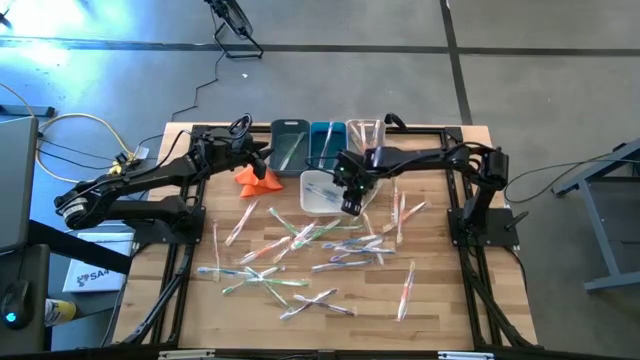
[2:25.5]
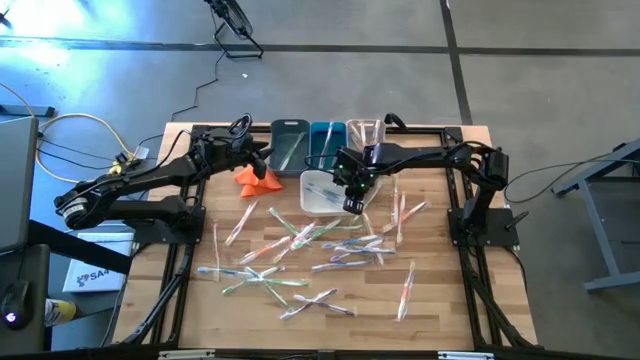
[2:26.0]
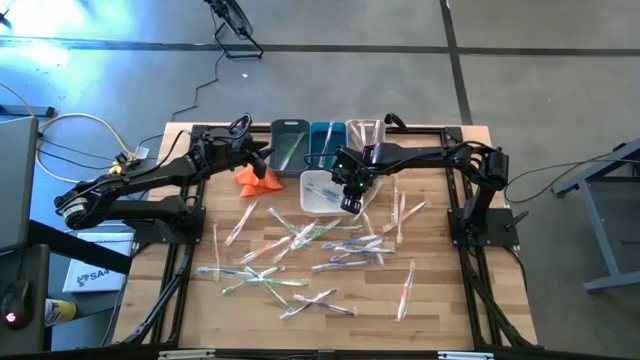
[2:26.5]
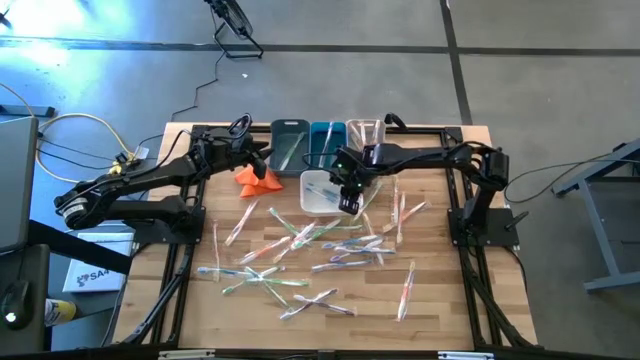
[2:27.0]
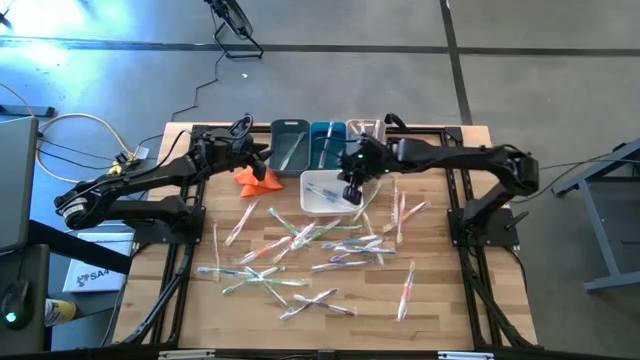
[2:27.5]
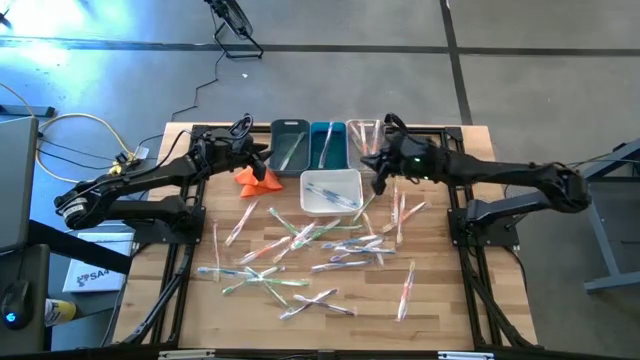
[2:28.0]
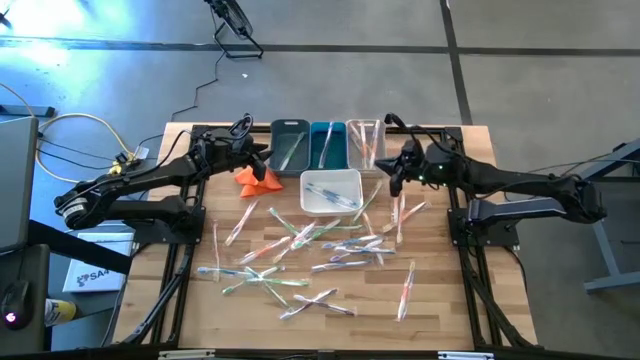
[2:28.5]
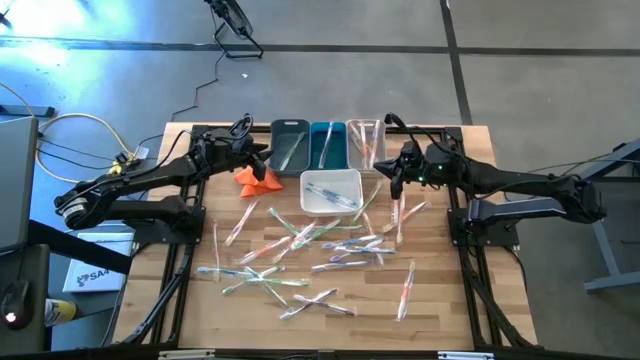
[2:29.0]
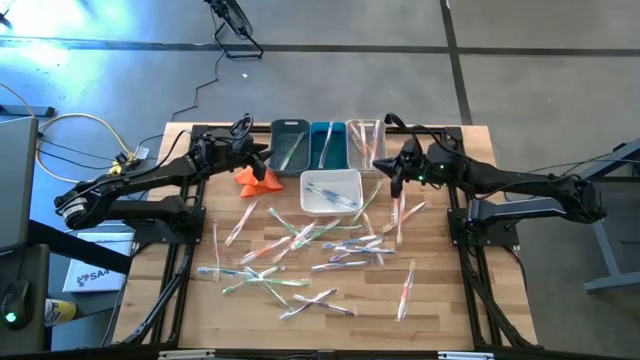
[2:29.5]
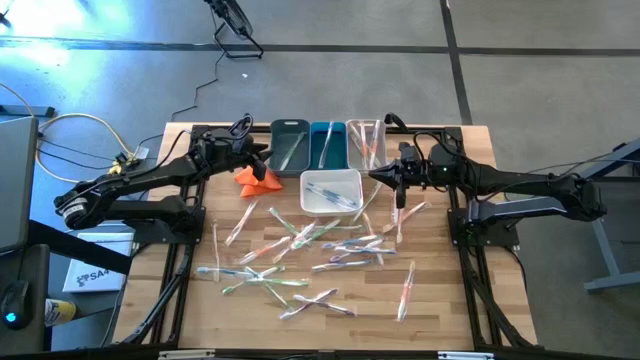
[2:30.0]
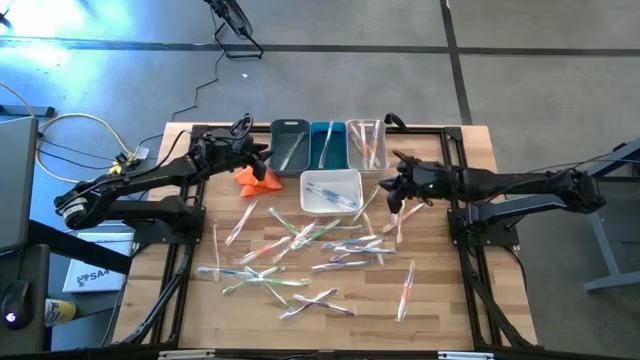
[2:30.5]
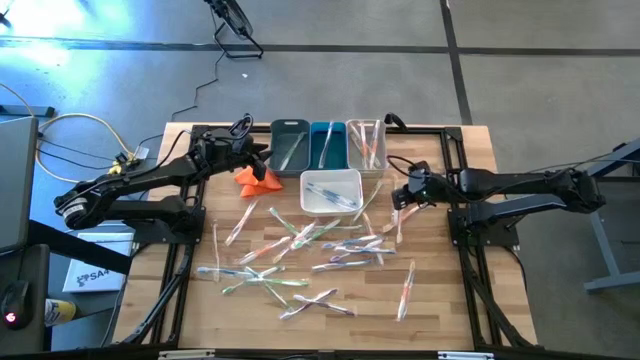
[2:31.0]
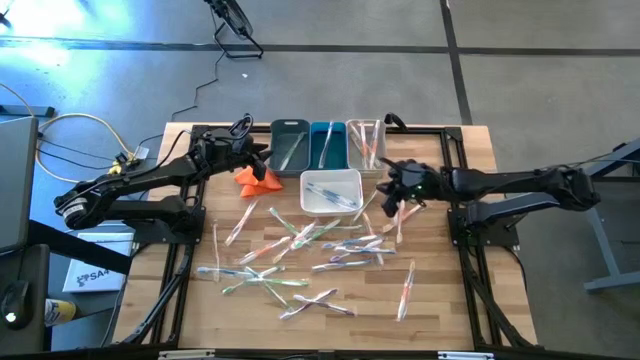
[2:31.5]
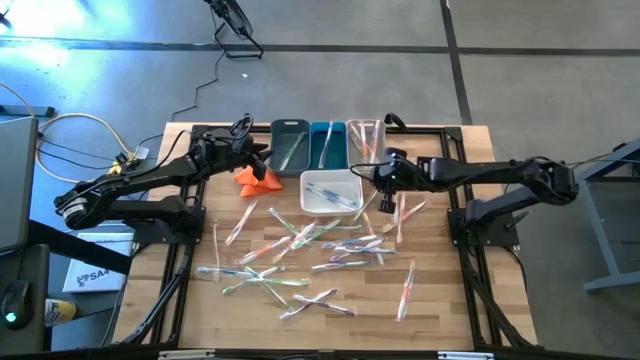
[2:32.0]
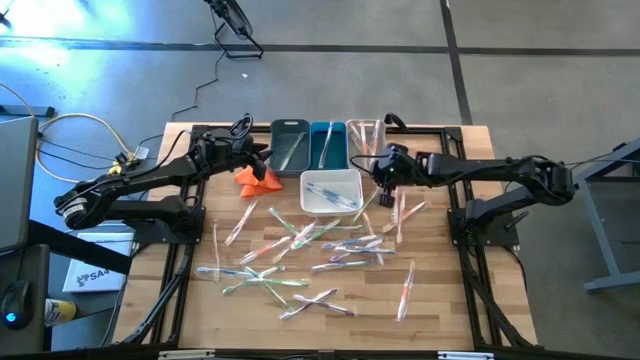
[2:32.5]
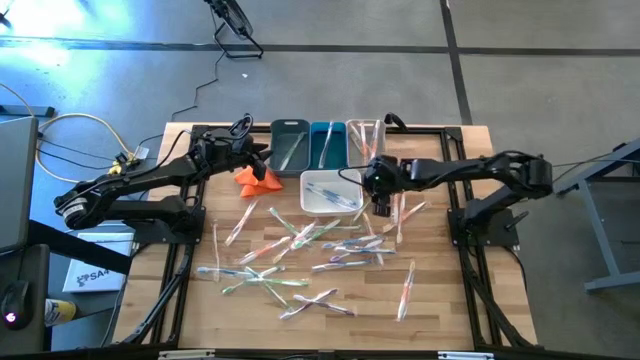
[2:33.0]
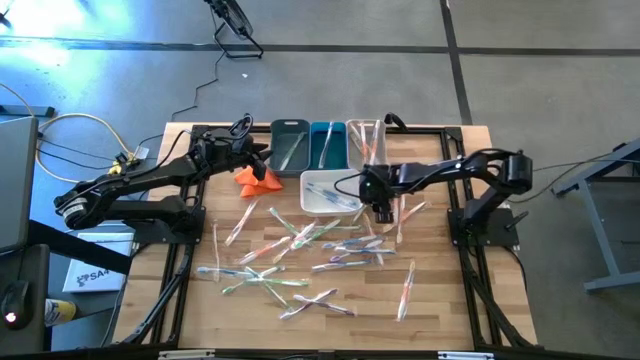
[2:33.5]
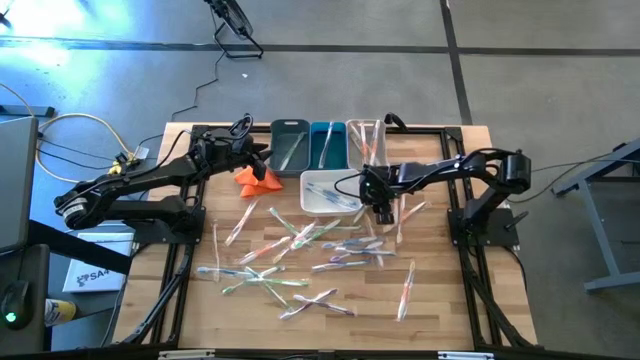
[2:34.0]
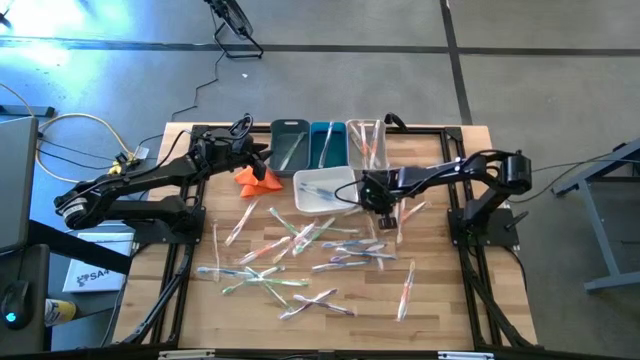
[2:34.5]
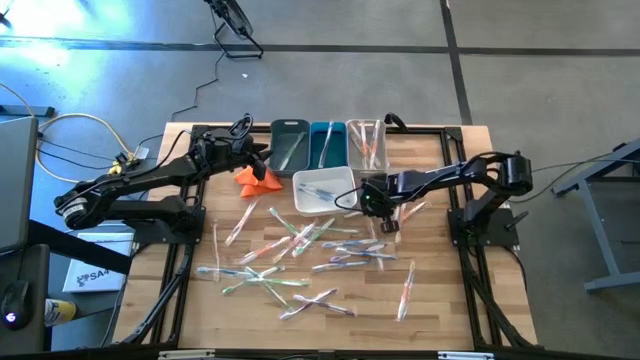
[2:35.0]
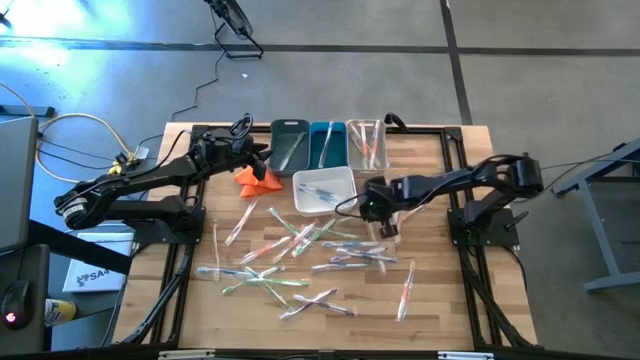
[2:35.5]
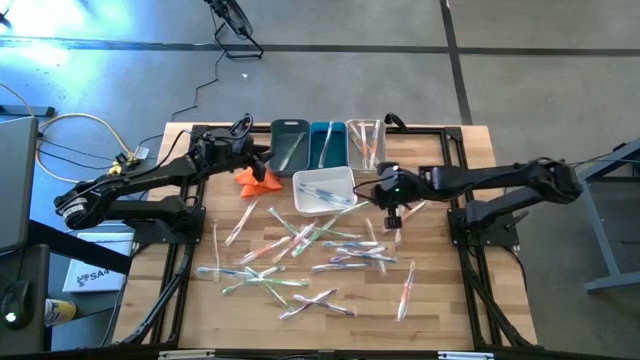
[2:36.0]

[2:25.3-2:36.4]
Task: Pick & Place Toothbrushes
Put the green toothbrush into the dark blue bin

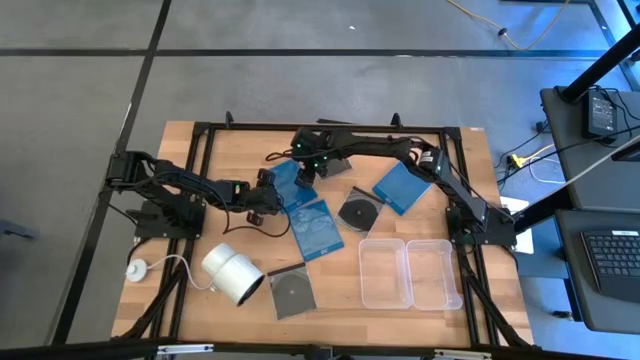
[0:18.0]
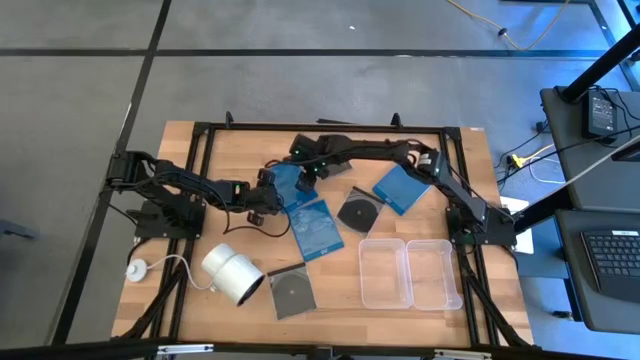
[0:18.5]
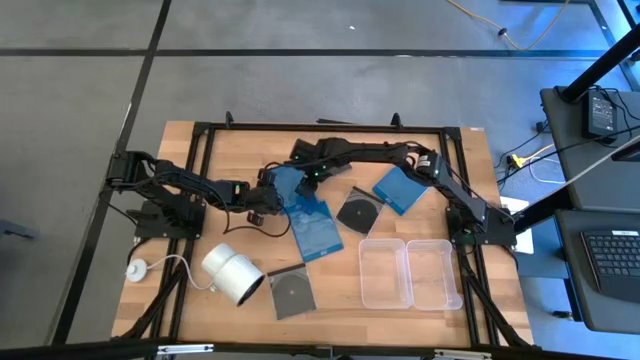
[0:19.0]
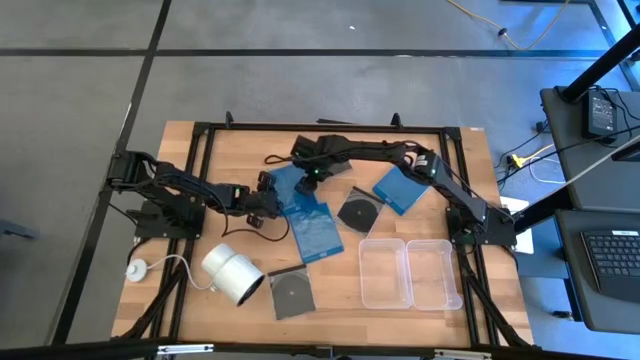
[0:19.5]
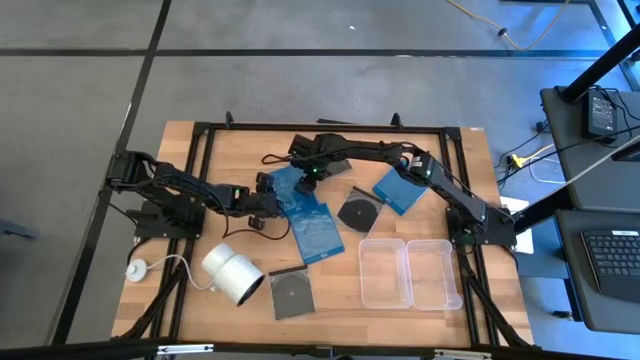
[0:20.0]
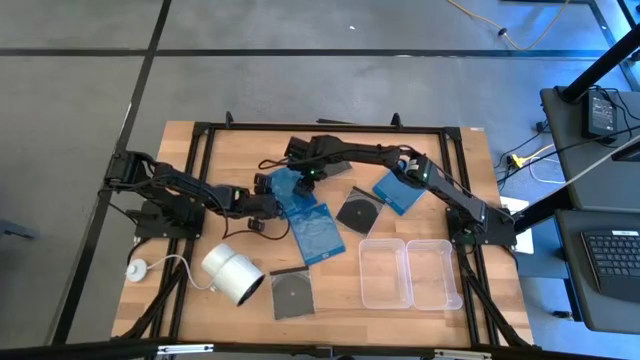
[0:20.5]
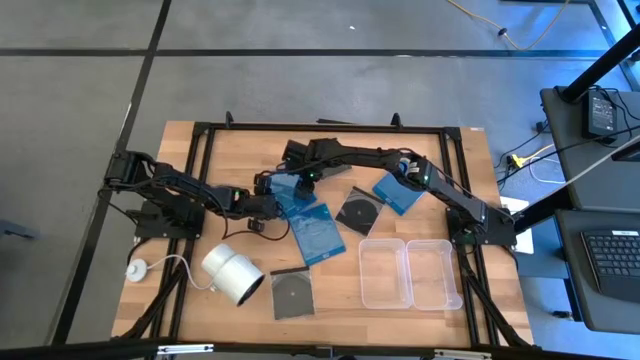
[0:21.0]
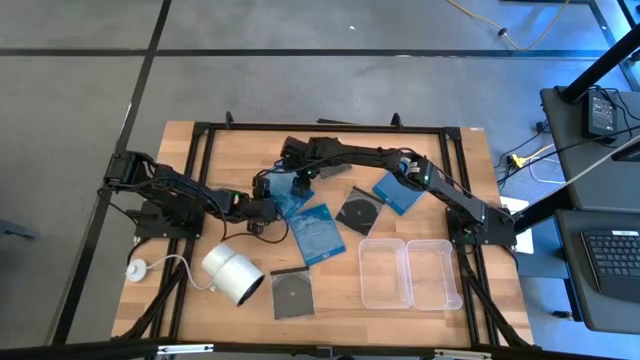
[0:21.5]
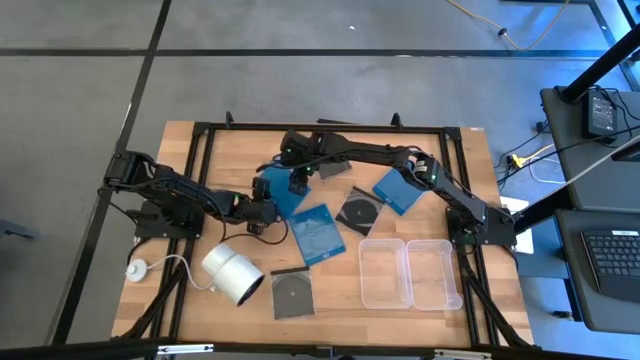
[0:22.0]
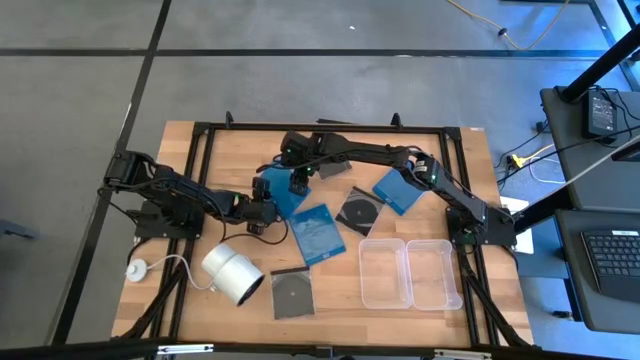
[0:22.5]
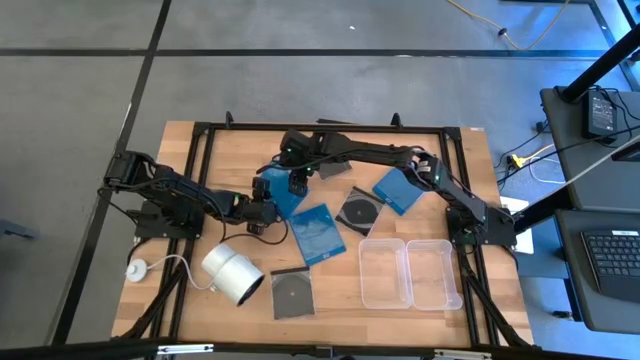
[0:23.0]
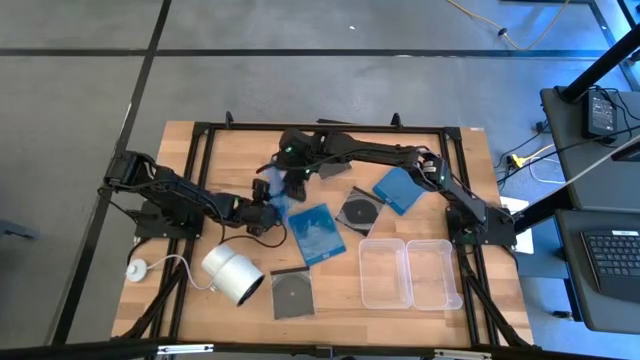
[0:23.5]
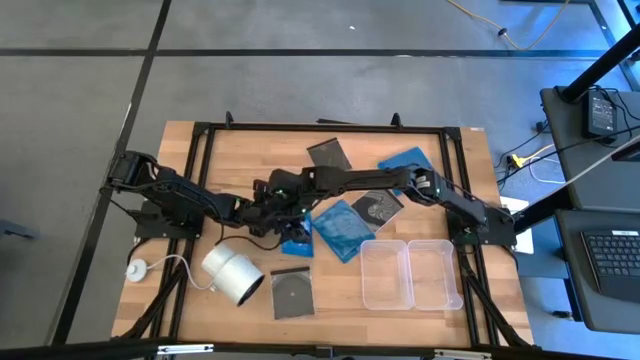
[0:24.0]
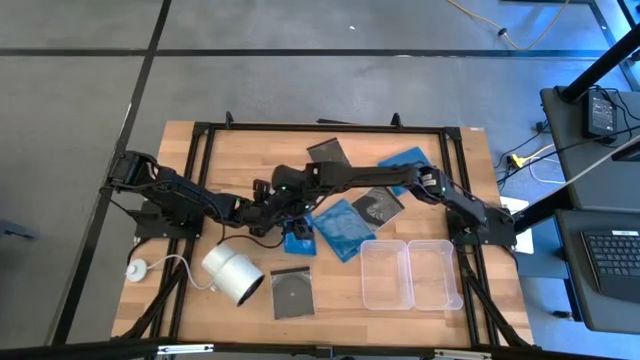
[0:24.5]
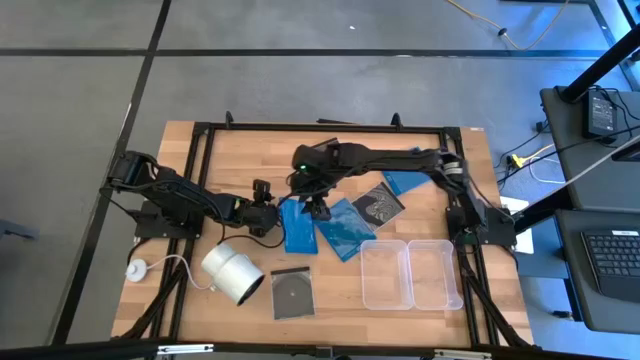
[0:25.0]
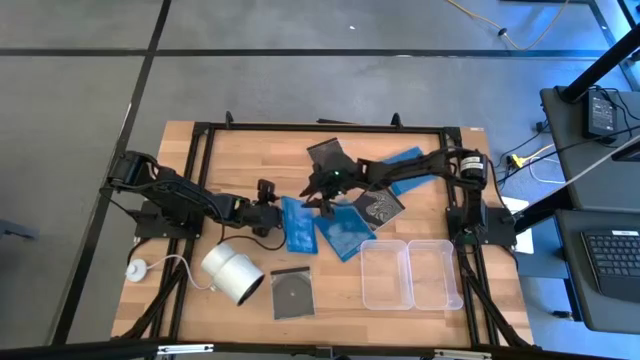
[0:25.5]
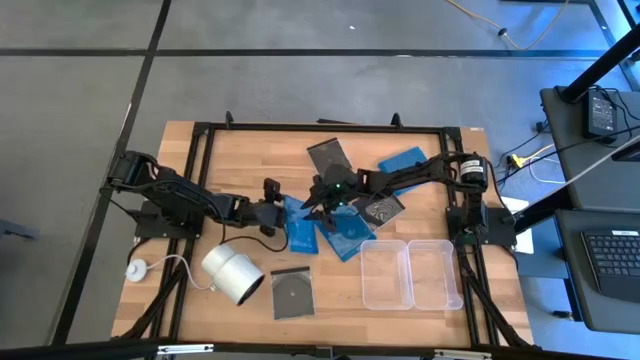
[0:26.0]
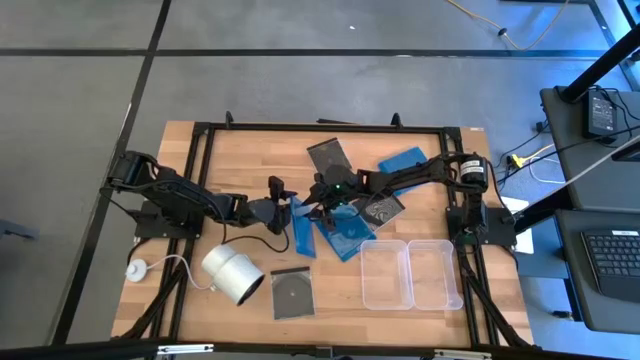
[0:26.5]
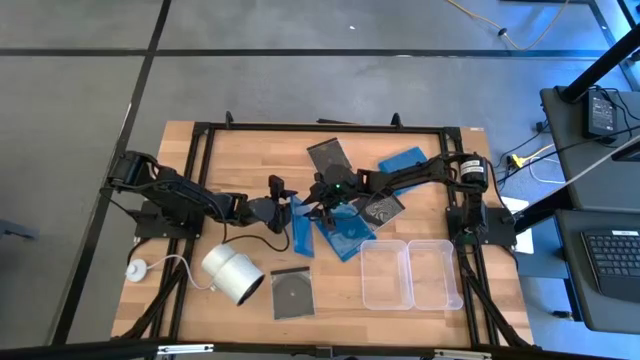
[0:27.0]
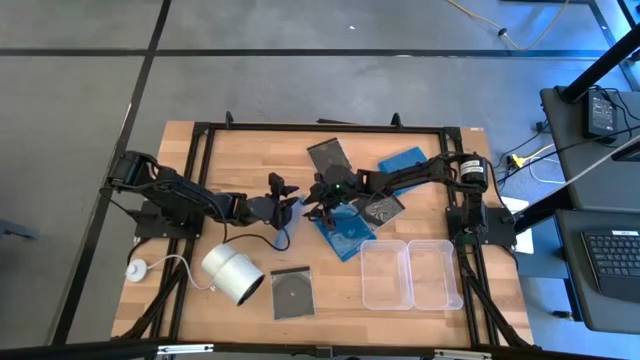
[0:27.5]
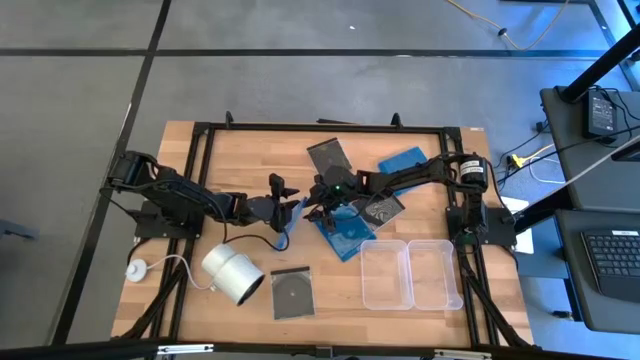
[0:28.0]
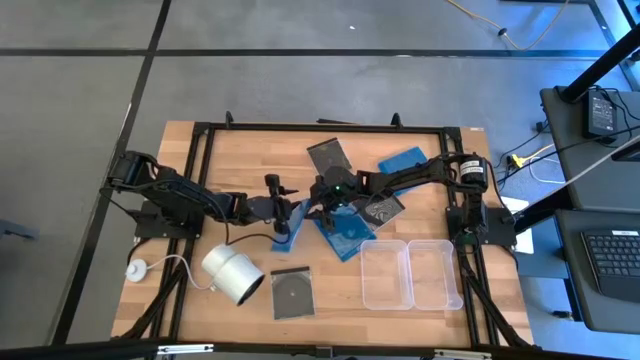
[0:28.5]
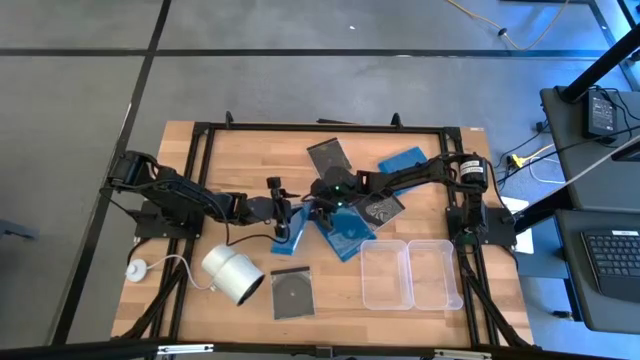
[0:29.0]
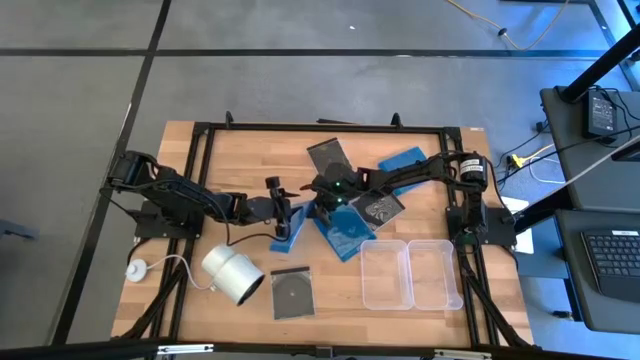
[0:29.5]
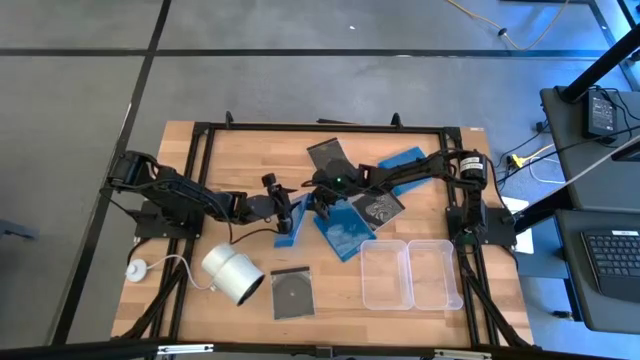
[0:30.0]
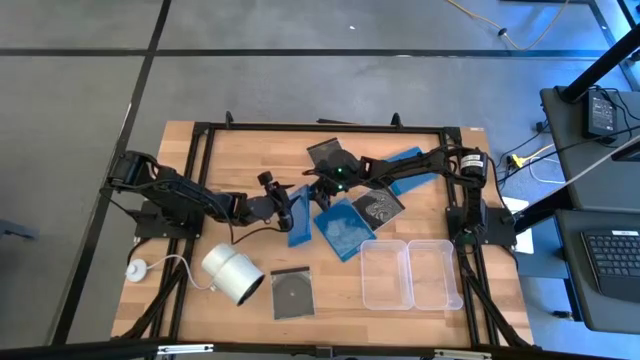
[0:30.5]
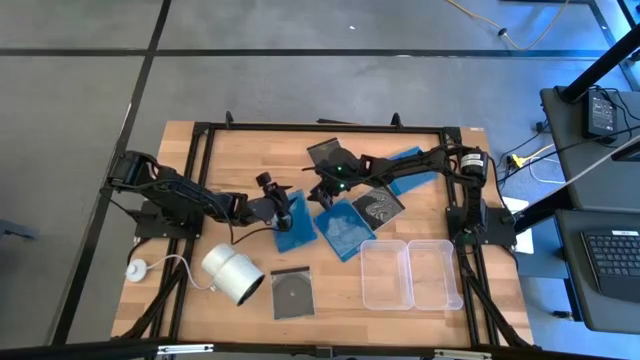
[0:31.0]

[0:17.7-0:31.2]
Task: Pick & place jewel cases by type
Put the top left blue CD case into the right transparent bin
